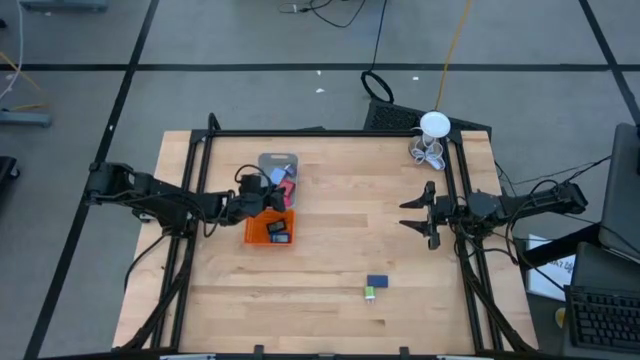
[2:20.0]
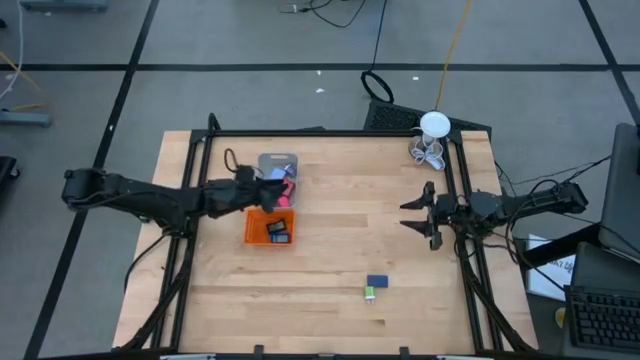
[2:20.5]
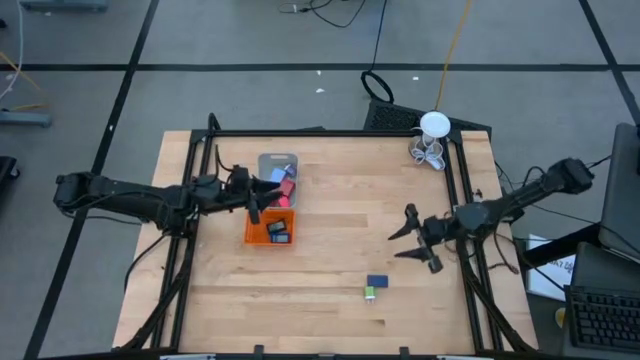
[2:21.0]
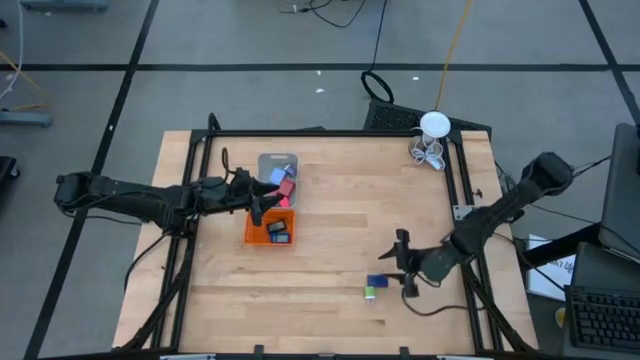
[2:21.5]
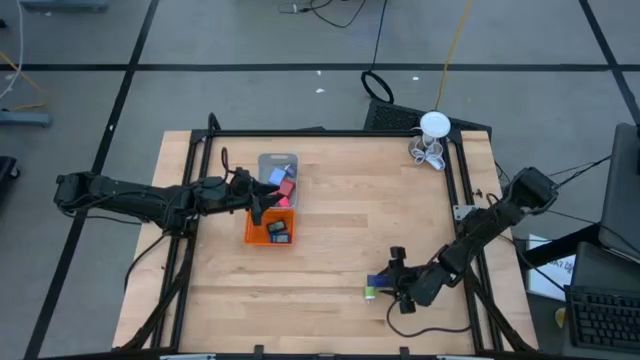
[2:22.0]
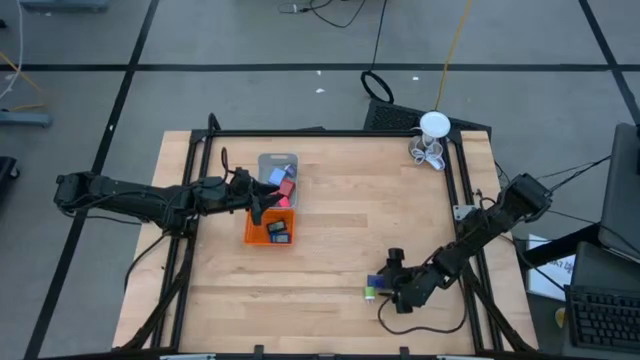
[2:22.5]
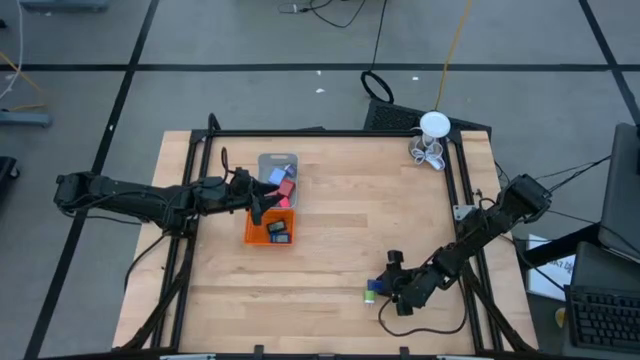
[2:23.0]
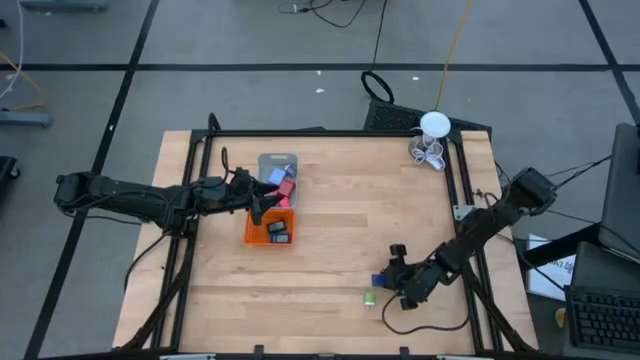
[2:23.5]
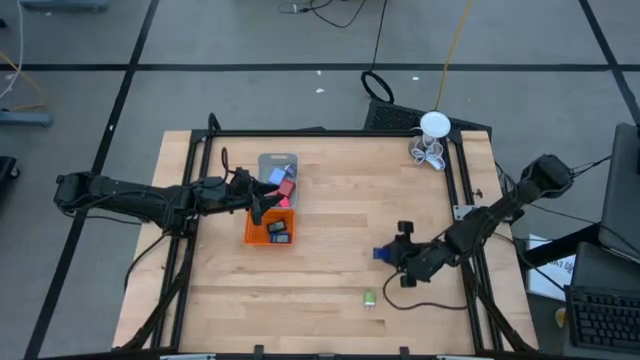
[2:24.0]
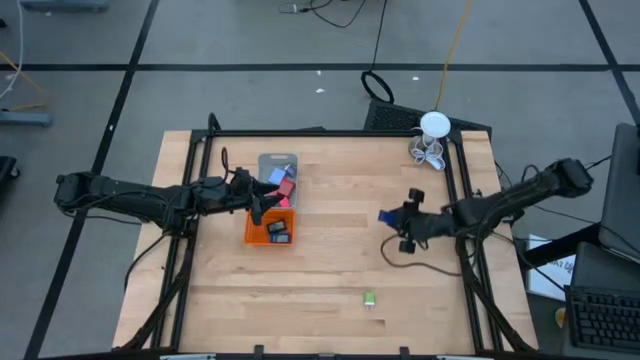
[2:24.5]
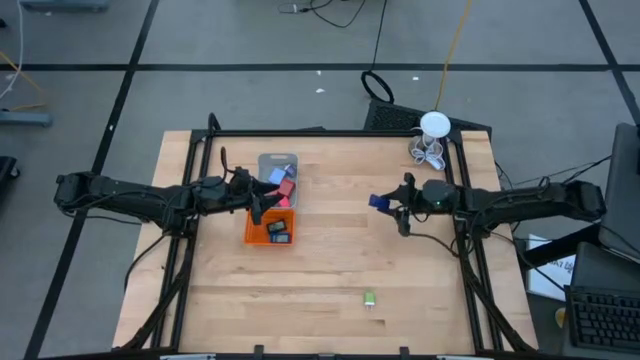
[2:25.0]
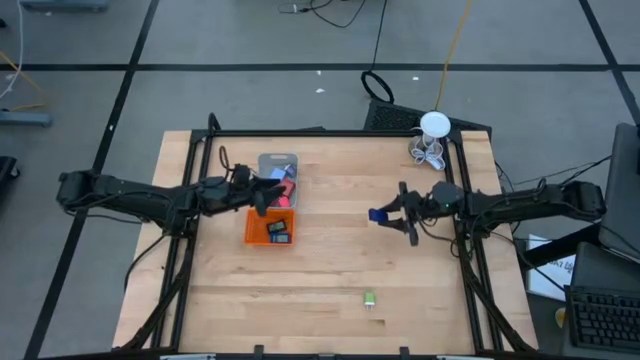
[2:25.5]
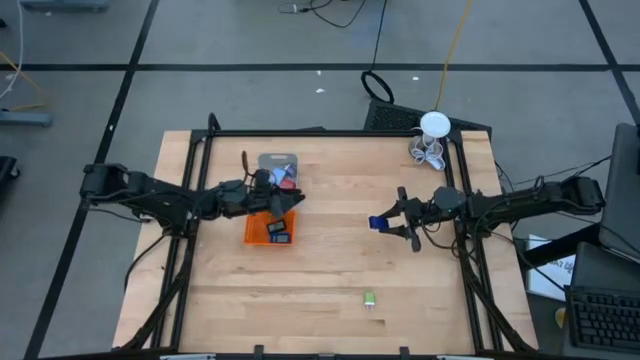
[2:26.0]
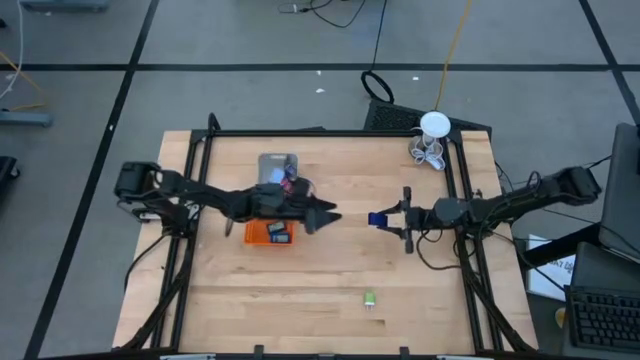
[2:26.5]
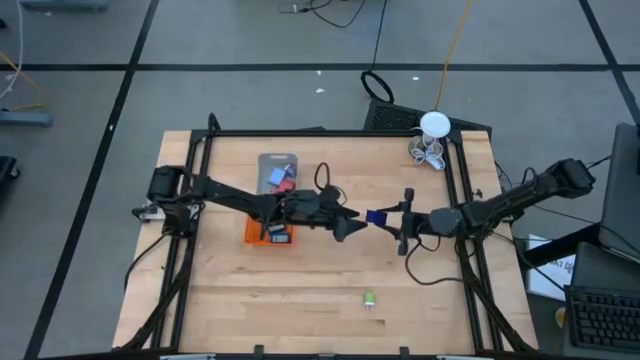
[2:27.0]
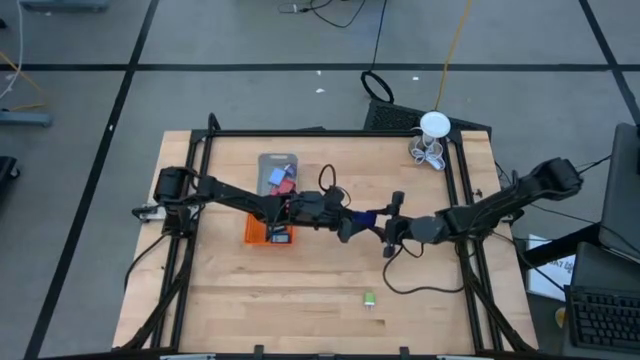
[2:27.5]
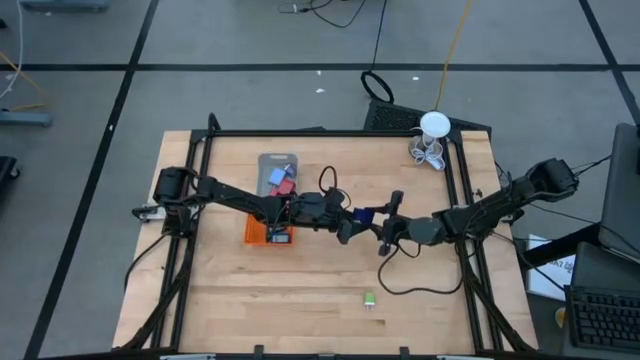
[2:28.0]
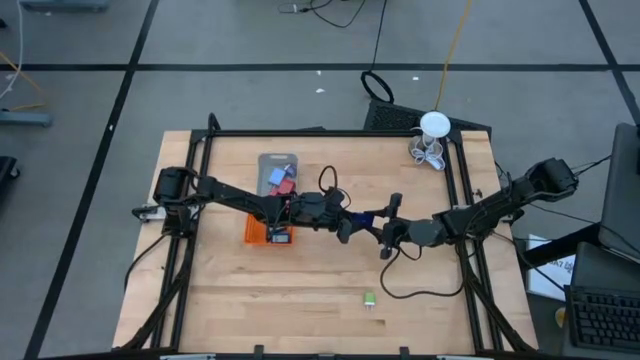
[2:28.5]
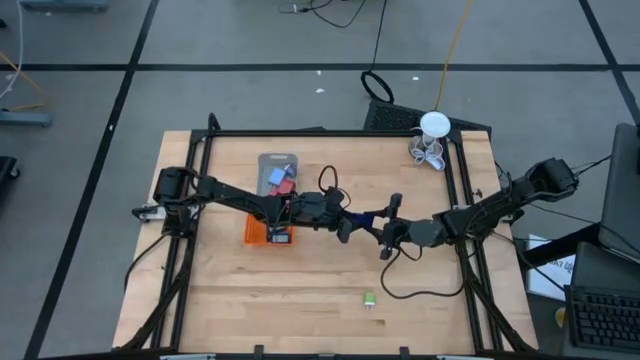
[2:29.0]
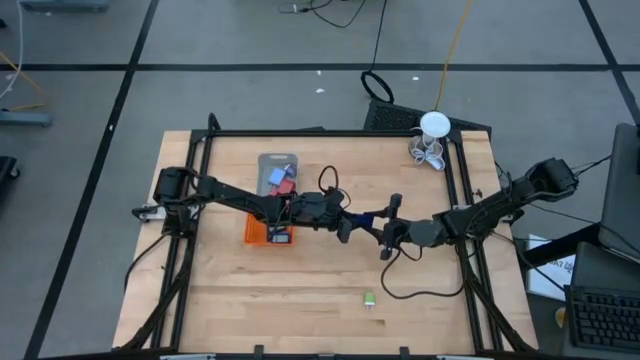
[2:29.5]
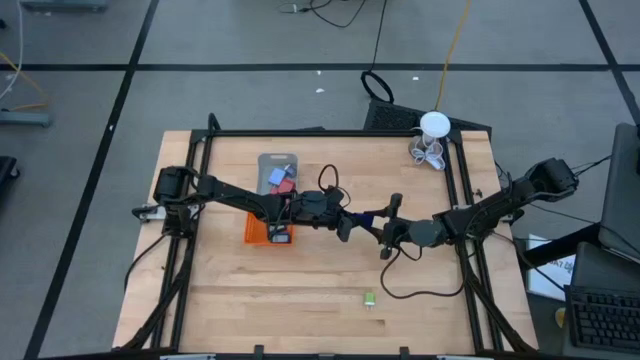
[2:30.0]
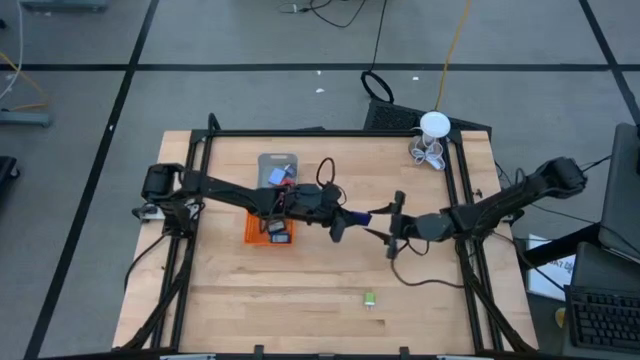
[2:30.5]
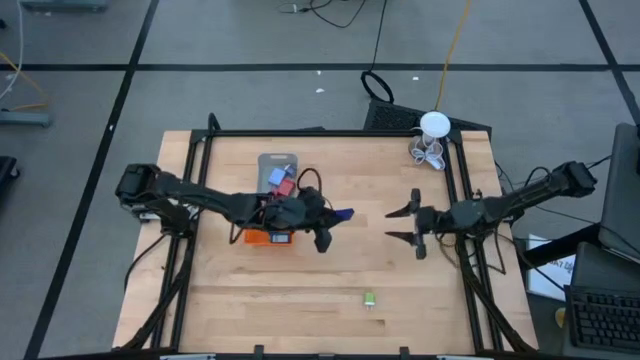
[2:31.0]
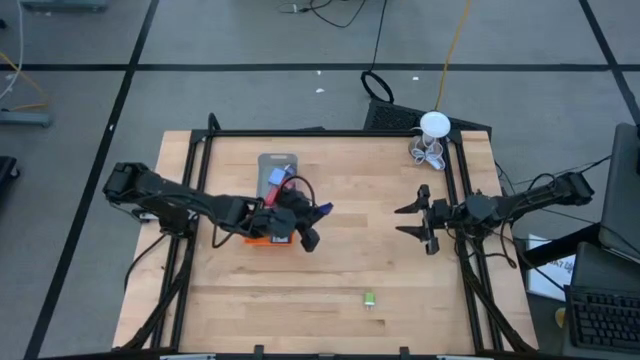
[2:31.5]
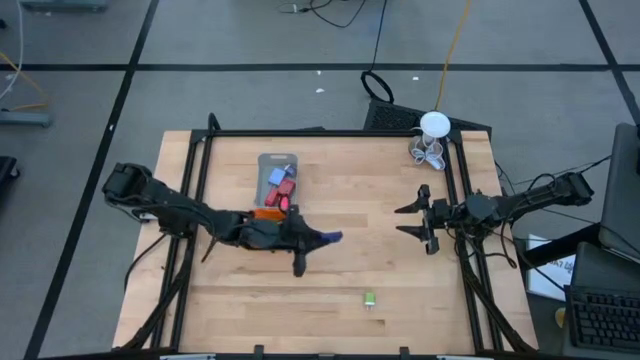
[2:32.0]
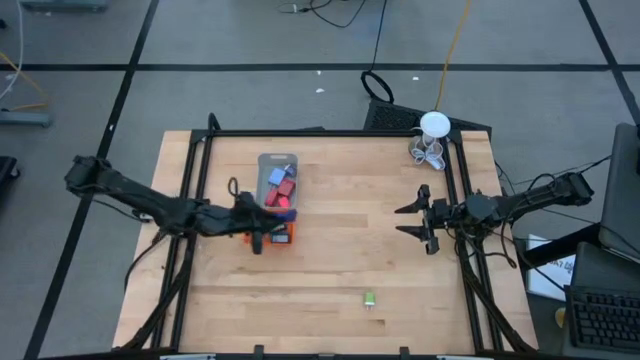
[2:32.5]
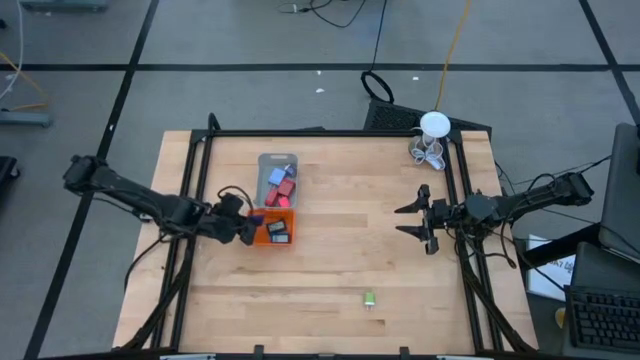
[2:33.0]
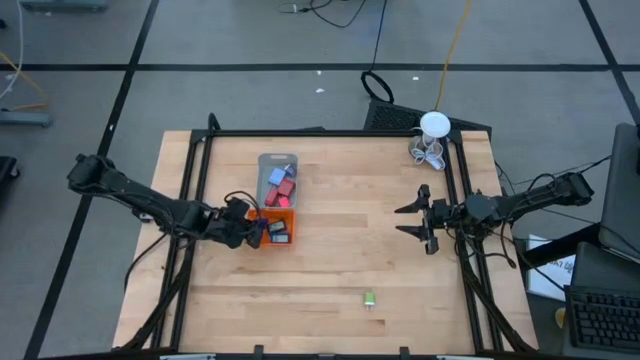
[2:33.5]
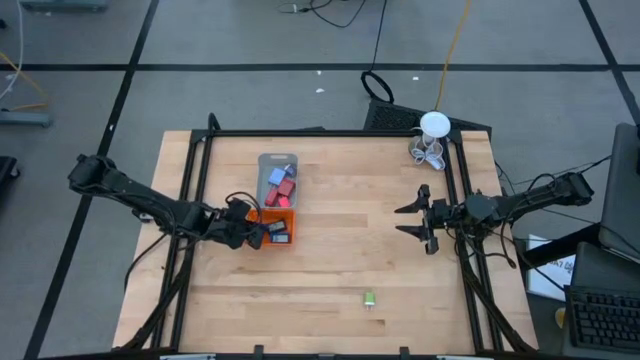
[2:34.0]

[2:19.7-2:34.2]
Task: Pick & Place Office items
Put the dark blue digital timer into the orange bin

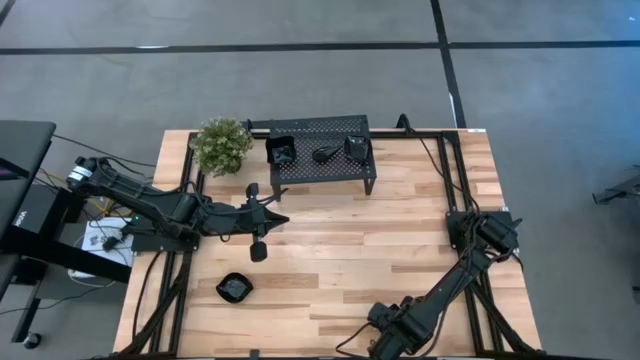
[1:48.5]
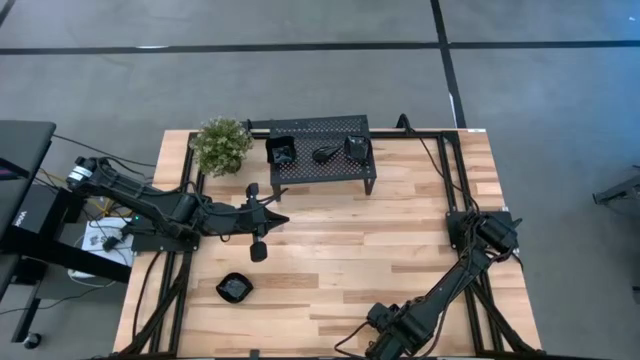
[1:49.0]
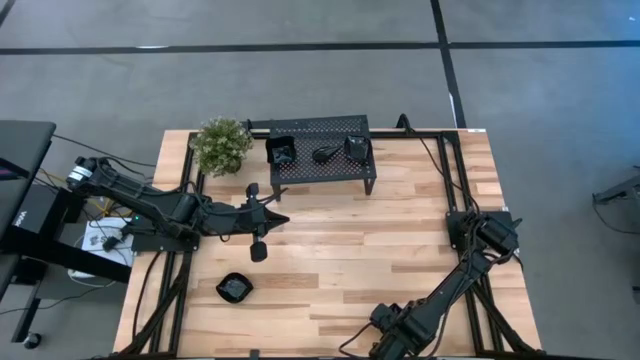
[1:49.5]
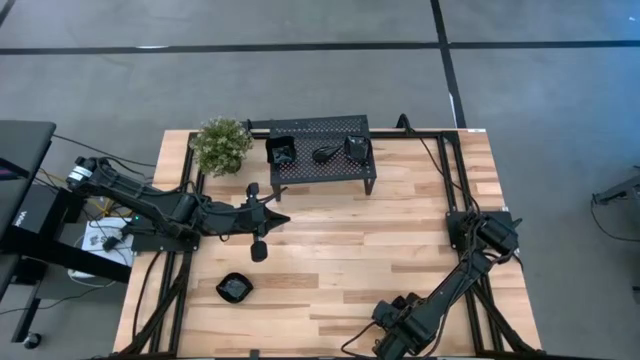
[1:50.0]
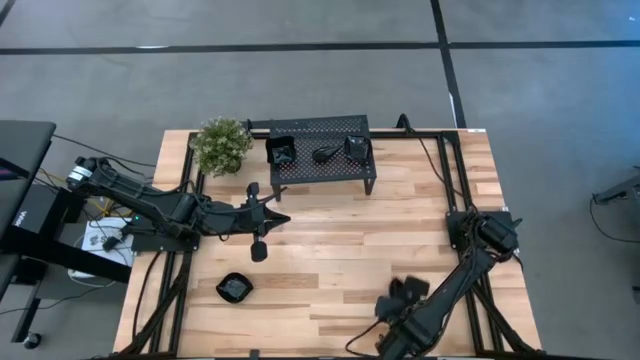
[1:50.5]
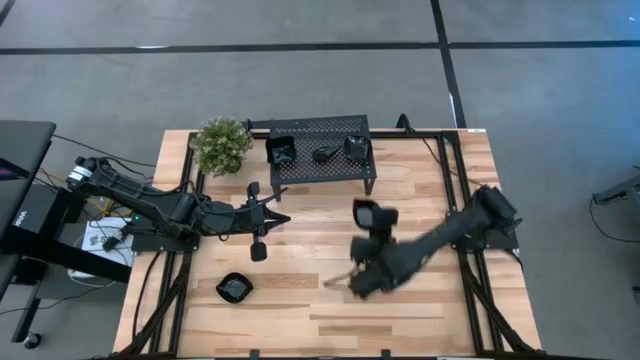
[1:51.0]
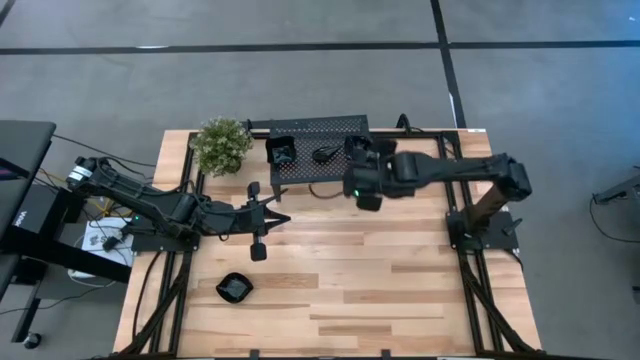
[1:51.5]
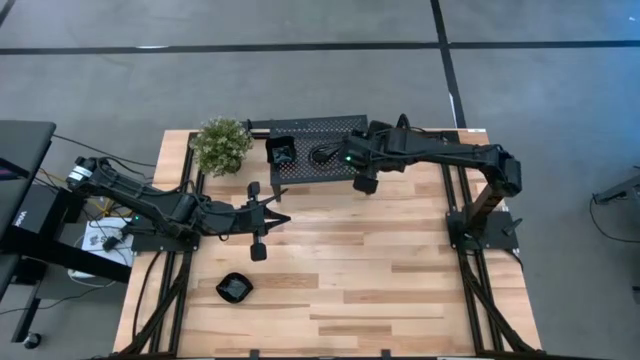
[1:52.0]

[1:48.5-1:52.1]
Task: Pick & Place Mini shaped plates
Stack the leaf shaped plate on top of the leaf shaped plate on the shelf
